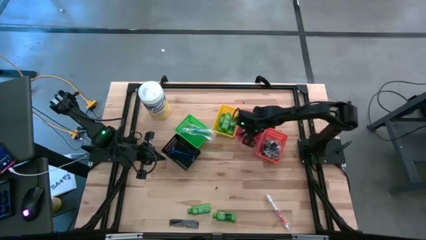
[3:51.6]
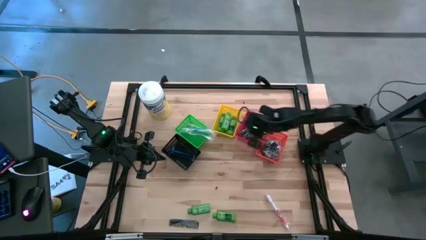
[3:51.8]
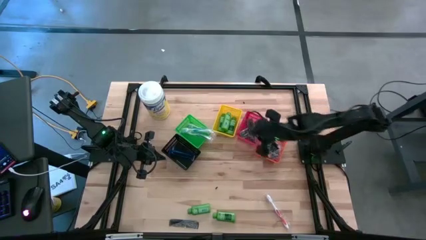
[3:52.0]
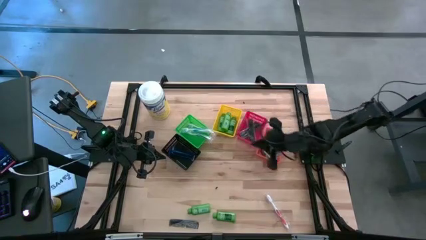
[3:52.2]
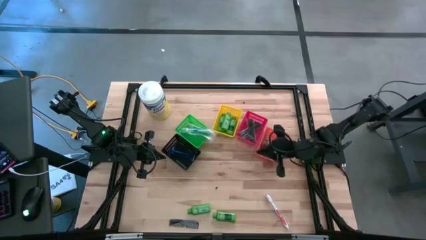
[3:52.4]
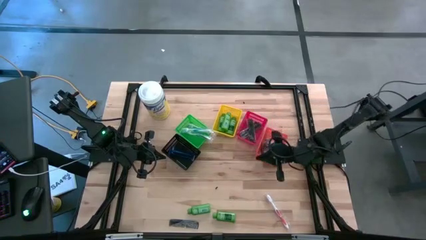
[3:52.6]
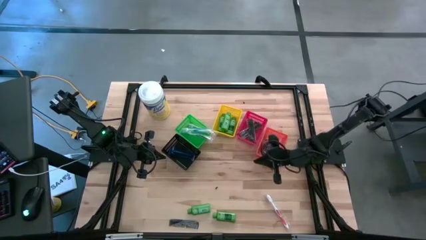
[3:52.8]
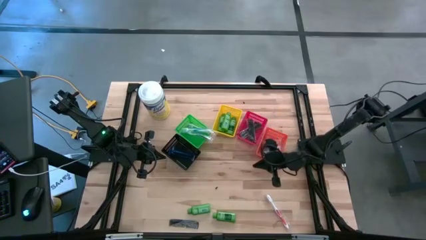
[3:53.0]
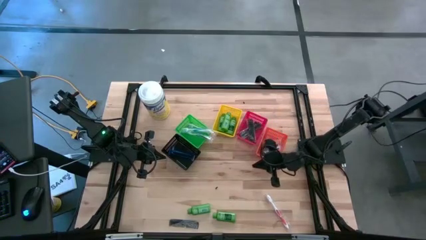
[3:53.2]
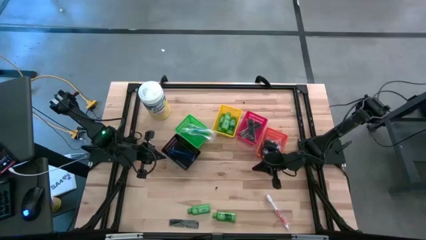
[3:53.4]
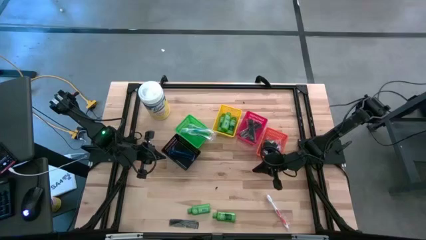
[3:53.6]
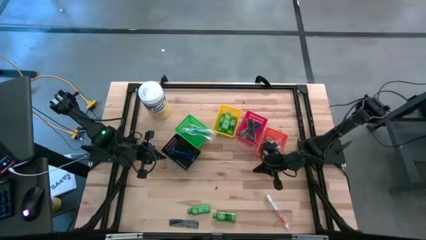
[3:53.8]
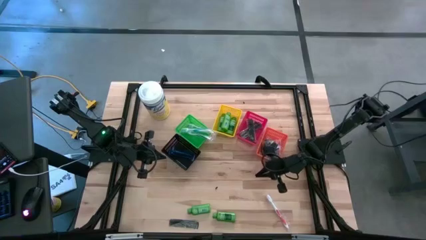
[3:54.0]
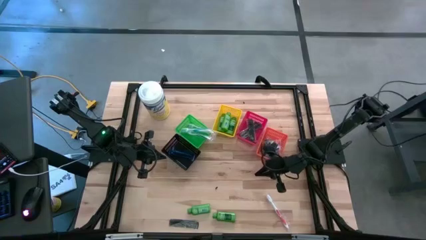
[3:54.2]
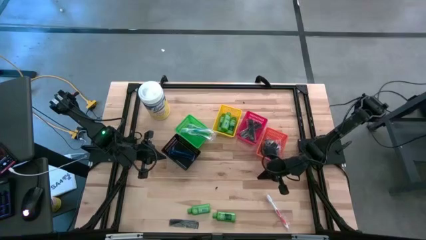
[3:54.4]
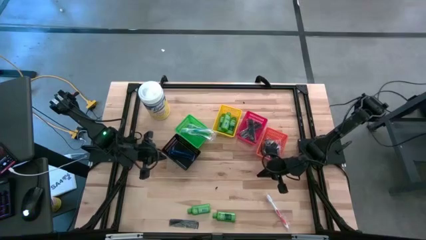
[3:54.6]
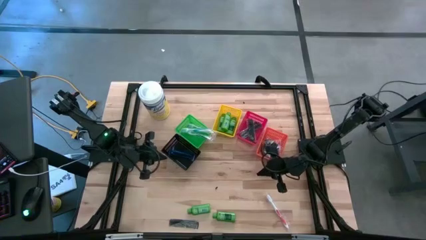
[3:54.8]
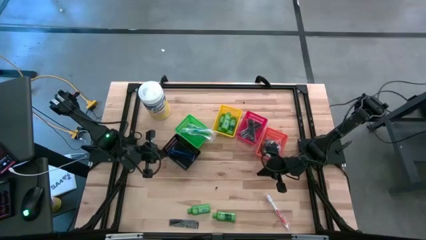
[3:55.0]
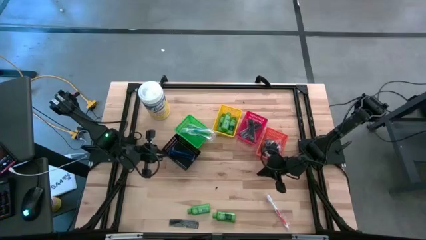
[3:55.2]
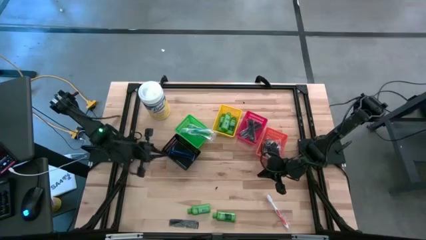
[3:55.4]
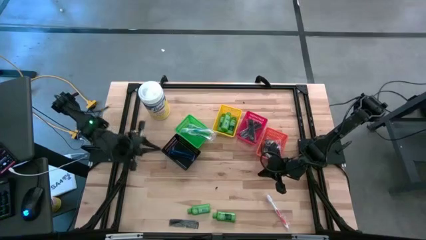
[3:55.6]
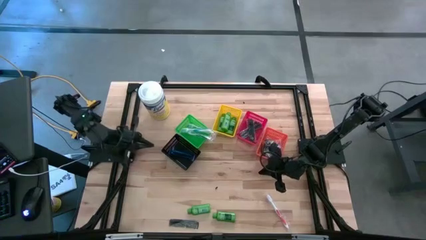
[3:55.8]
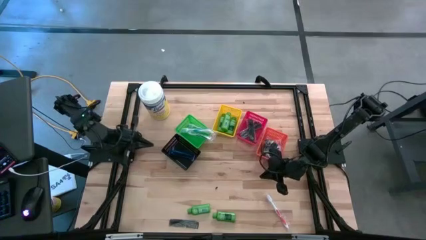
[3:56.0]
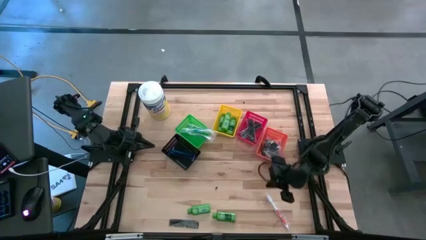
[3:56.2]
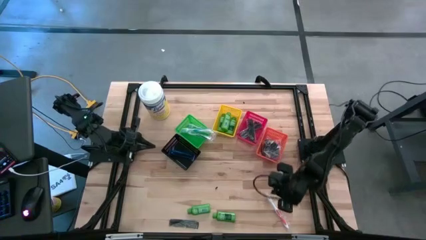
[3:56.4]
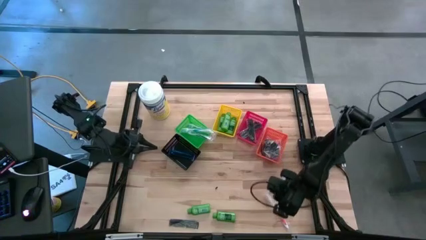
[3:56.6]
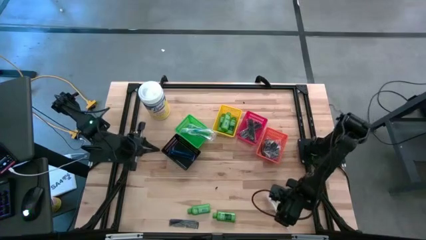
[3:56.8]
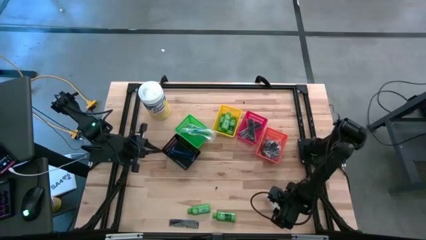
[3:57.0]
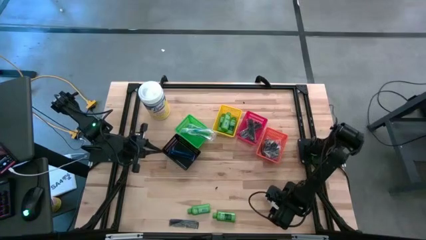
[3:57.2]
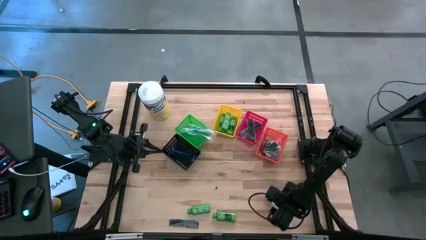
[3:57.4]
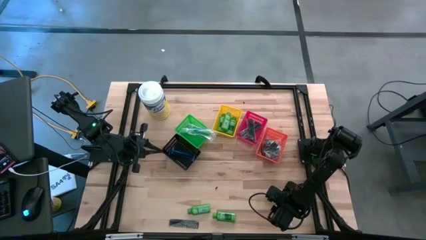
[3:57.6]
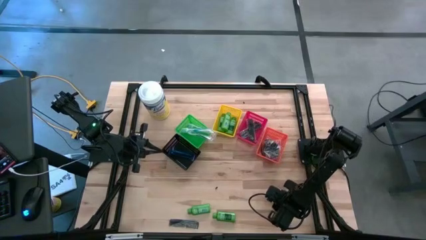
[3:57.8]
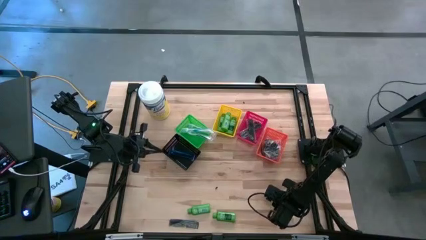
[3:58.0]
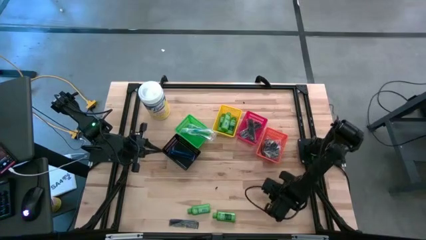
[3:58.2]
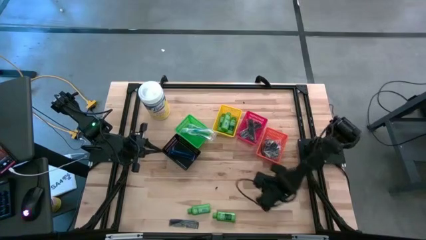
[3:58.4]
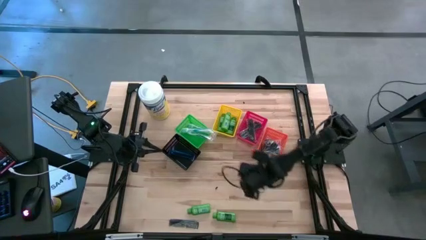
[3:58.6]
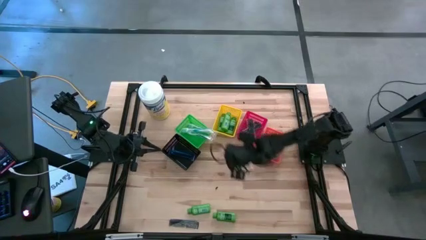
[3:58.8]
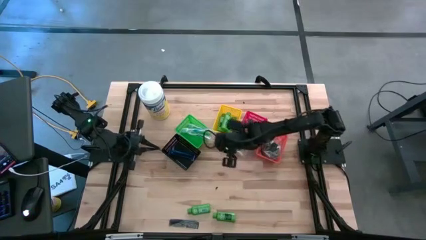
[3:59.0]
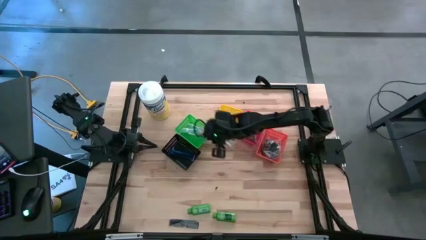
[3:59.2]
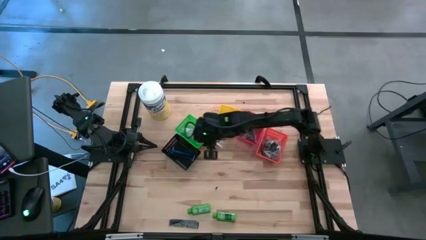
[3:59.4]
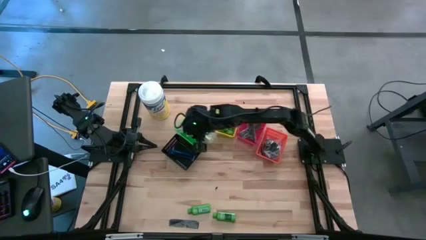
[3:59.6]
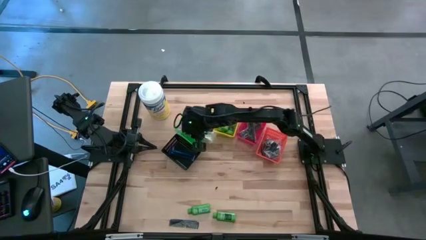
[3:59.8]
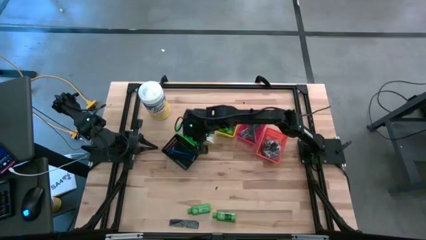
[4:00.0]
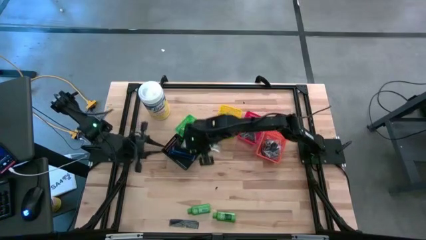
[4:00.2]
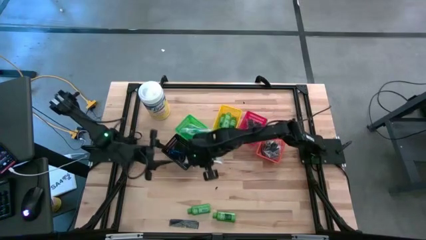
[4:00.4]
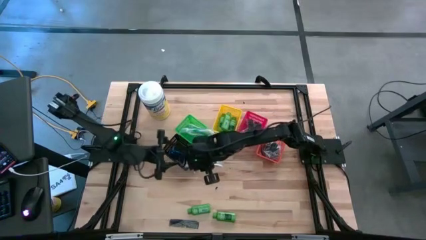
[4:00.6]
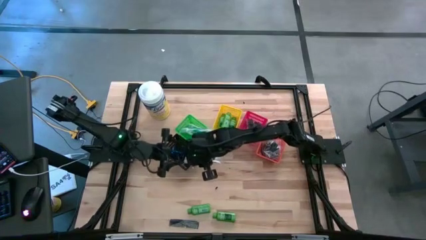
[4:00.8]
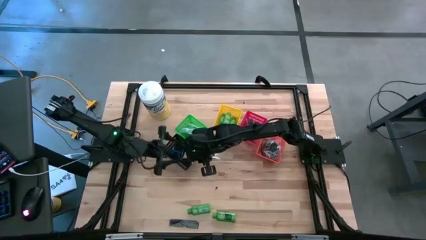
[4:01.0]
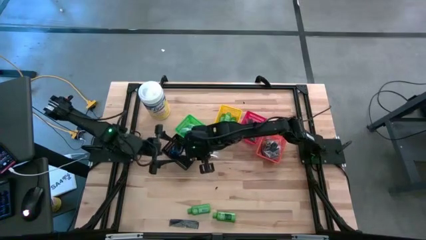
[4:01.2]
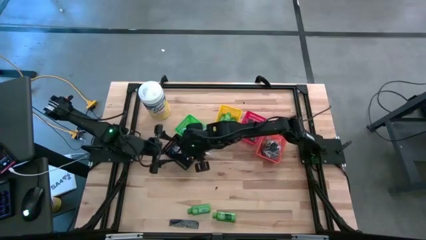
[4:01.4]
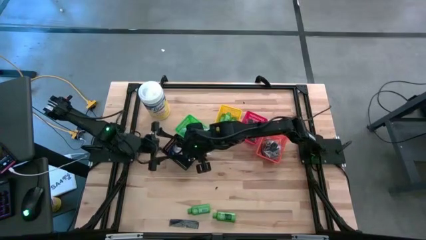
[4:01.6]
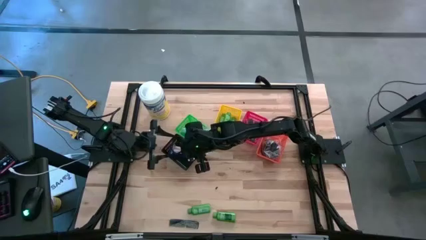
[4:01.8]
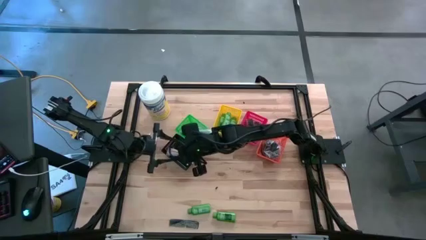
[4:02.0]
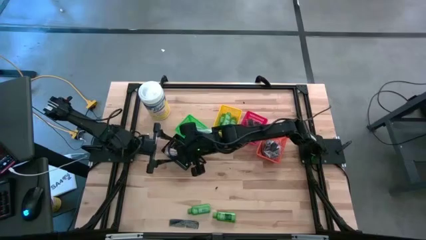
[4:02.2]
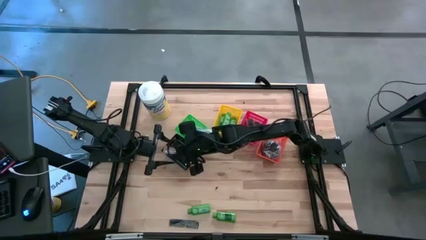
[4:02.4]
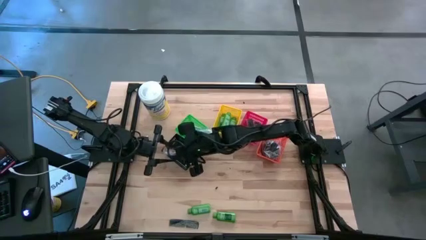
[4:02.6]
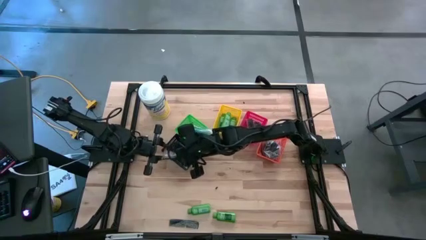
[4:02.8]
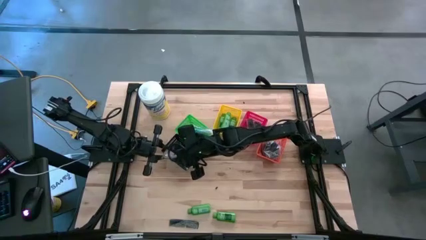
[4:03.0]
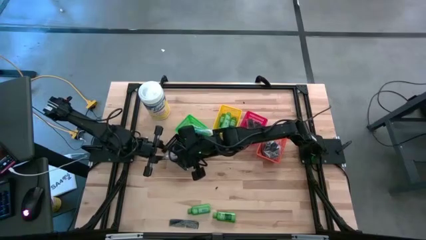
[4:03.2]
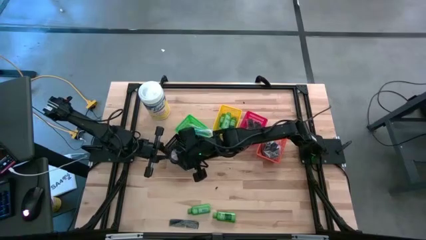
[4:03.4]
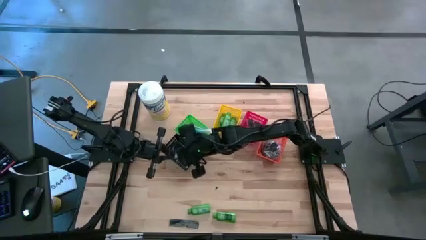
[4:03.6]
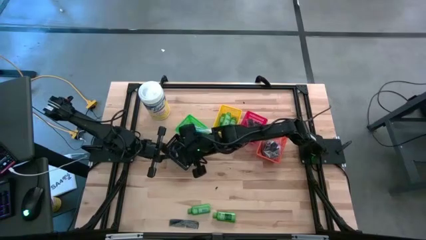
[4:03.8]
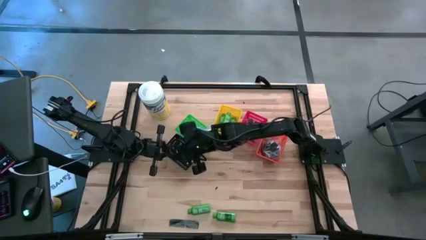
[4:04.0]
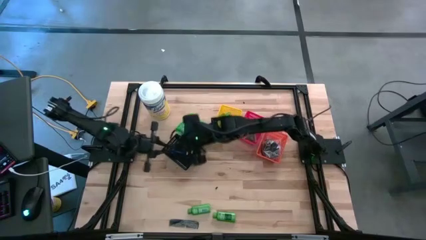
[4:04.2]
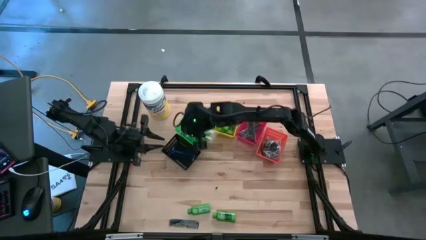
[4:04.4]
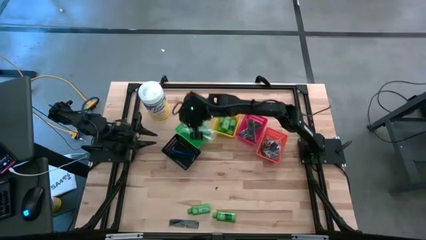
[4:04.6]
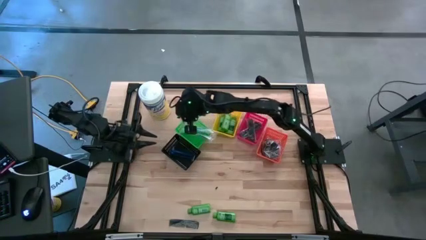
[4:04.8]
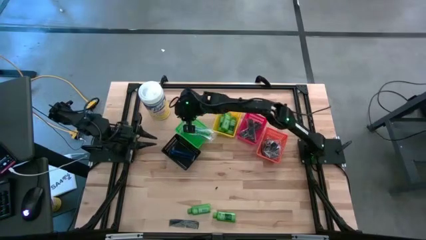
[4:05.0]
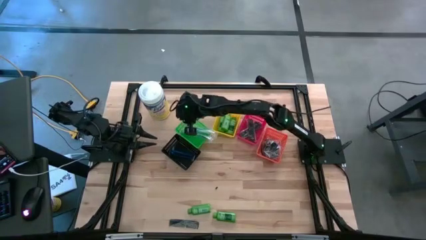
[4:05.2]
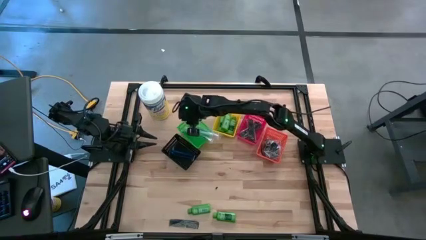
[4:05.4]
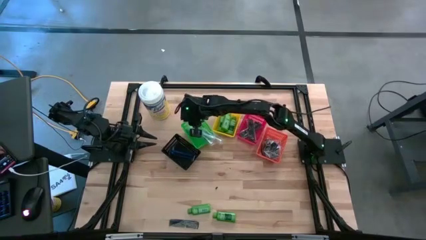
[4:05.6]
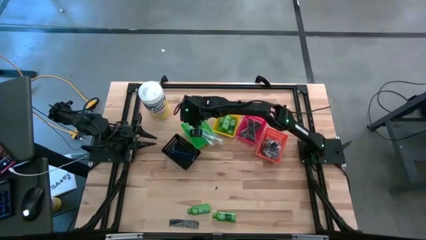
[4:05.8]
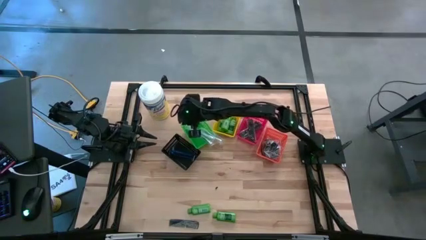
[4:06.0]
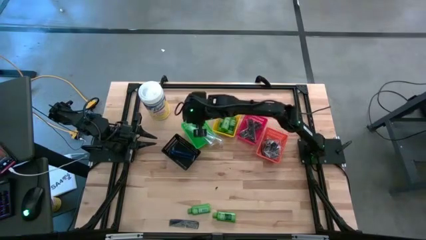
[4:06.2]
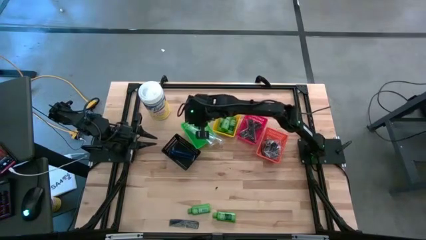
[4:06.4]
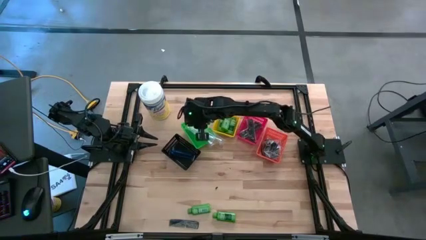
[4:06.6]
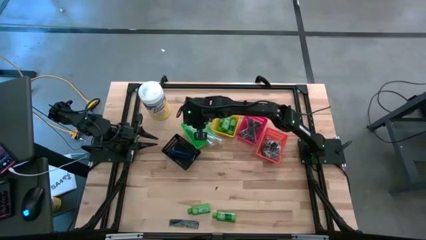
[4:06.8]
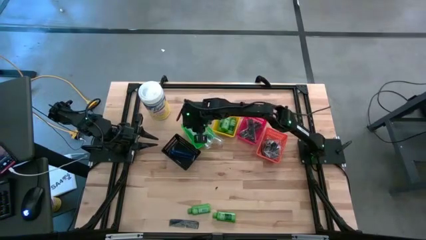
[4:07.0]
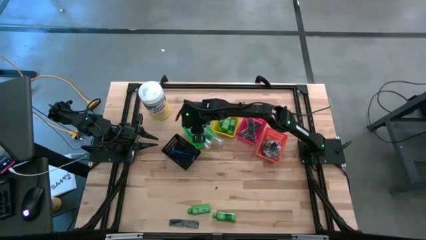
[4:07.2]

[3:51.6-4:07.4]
Task: Pick & Place Travel size toiletries
Put the orange toothbrush into the green bin

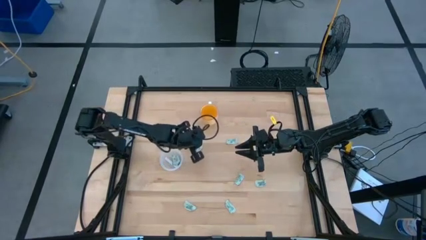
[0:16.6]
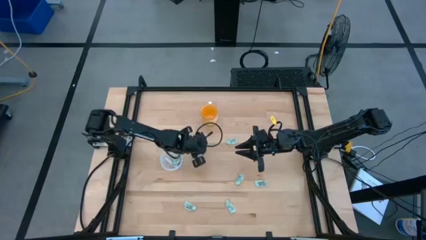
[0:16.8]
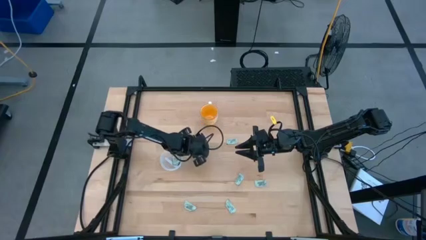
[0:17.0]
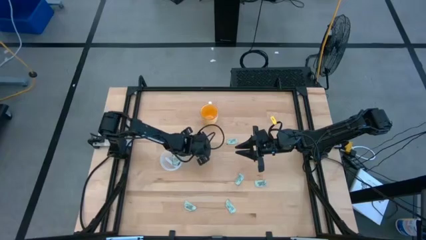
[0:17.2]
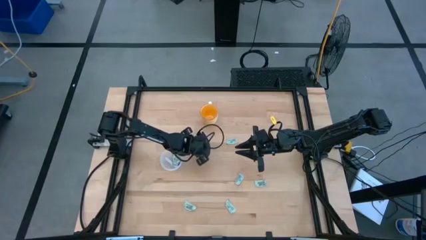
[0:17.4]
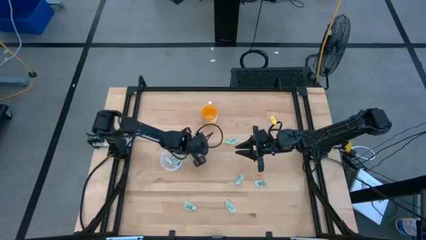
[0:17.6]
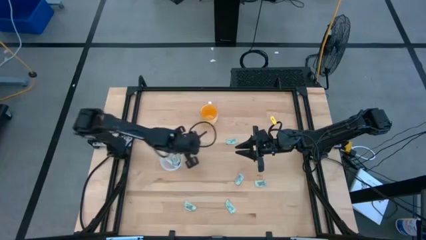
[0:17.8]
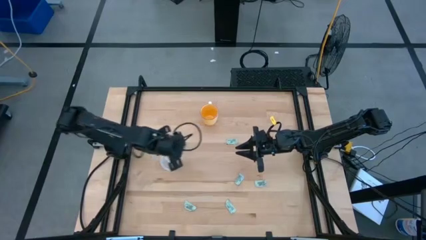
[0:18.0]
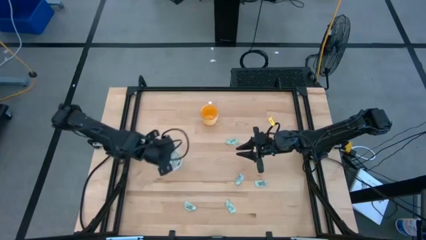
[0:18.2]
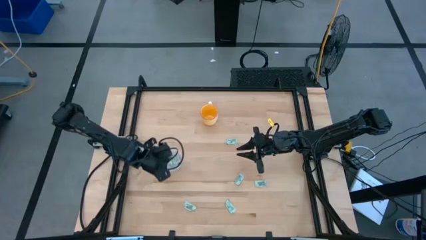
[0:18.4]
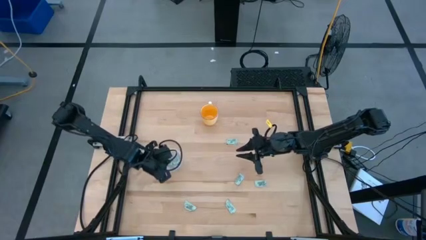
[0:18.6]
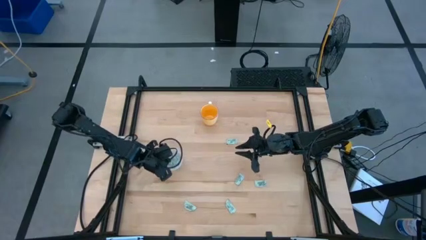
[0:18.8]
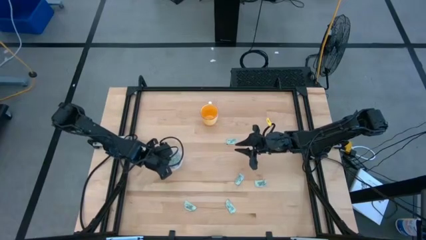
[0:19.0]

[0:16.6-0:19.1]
Task: Pick and place Stevia / Truvia into bins
Put the stevia packet into the container
